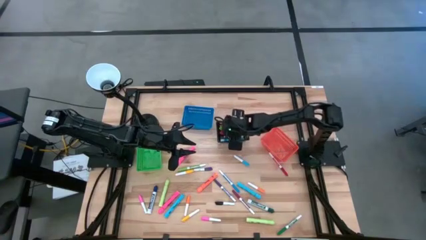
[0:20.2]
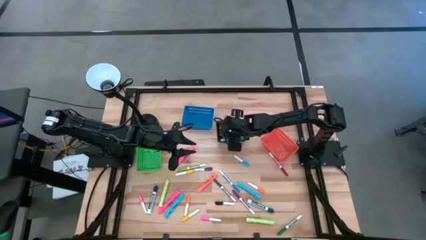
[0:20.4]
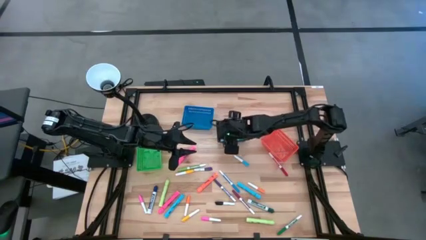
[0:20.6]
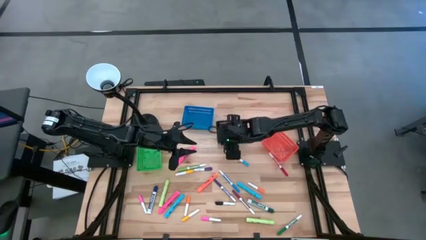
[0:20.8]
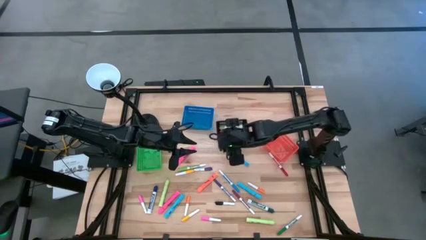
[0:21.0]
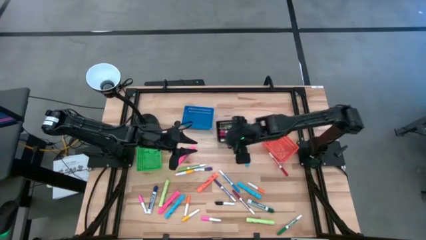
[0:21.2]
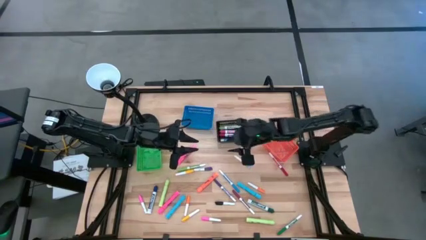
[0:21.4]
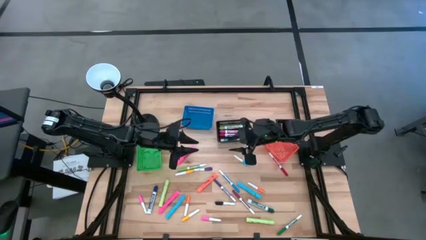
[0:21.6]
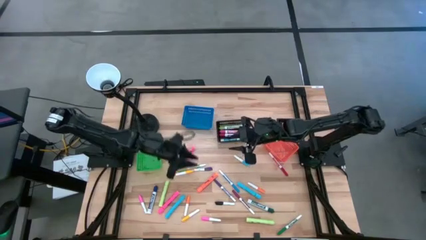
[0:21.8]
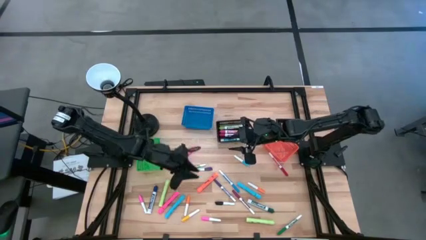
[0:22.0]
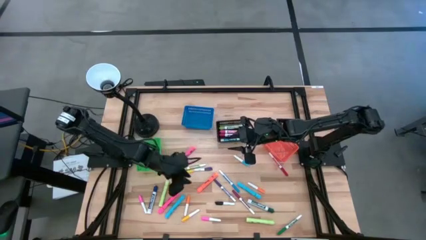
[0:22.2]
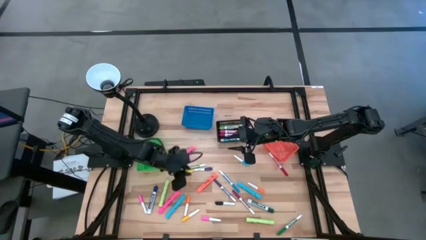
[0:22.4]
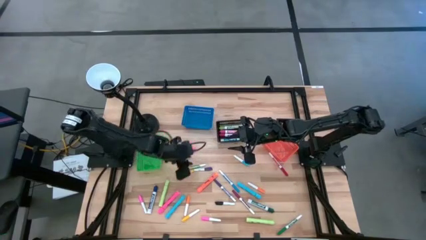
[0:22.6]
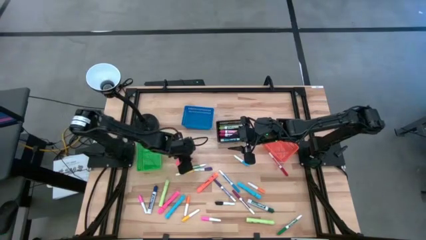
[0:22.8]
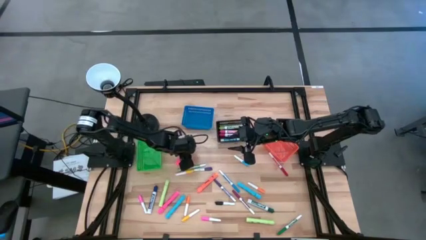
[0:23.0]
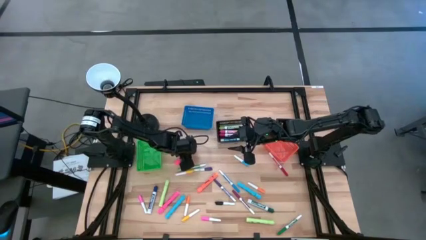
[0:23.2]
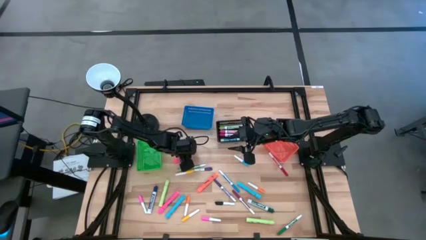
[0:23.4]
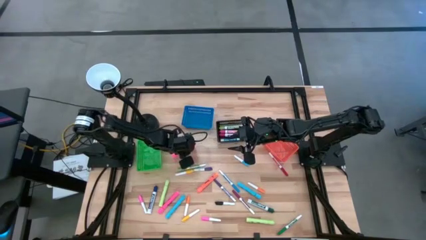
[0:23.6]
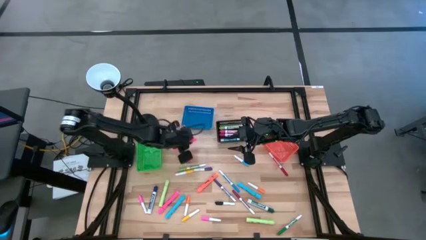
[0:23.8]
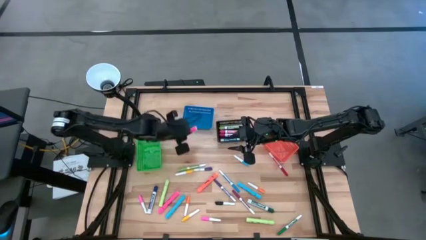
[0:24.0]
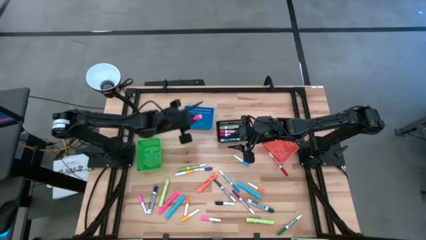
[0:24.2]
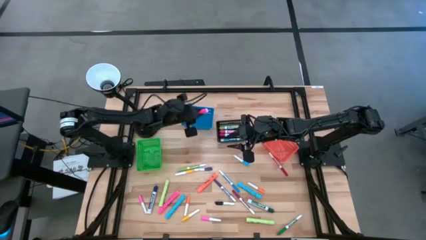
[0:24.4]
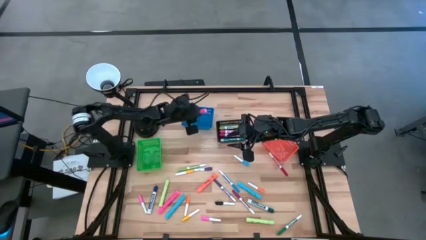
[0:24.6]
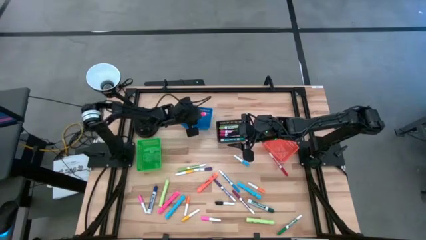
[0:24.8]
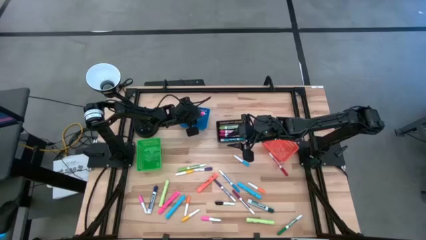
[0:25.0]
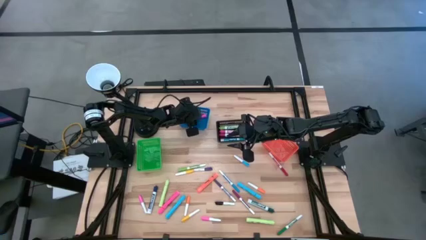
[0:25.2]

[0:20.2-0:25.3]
Task: Pick & Place Markers
Put the top pink highlighter pen into the blue basket

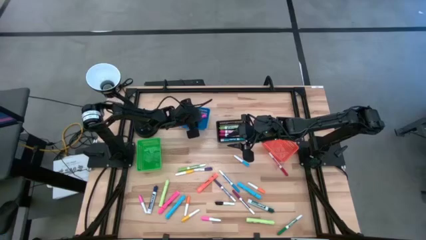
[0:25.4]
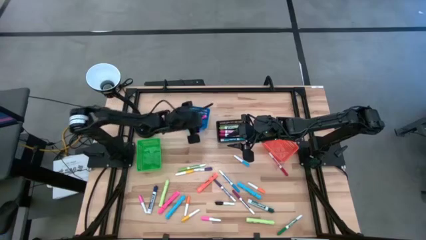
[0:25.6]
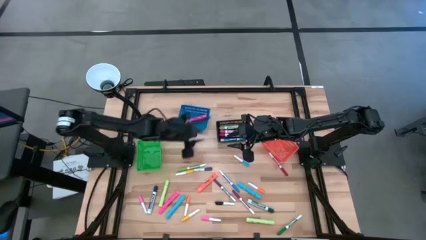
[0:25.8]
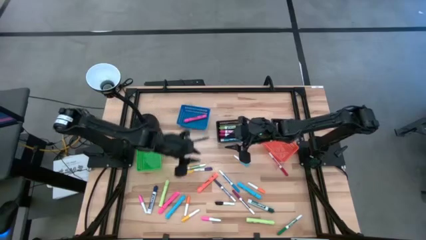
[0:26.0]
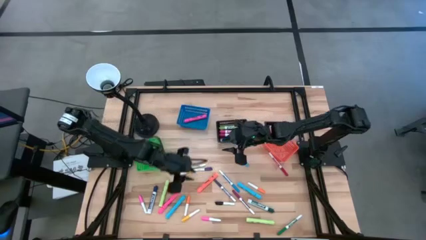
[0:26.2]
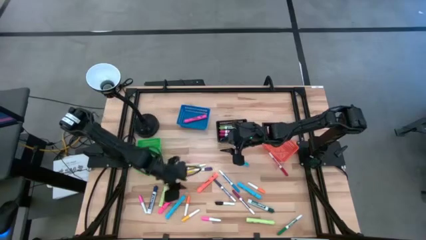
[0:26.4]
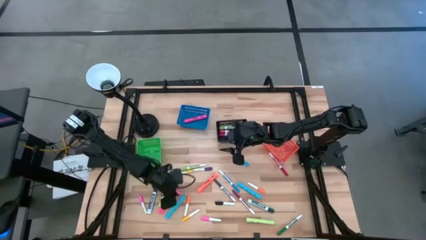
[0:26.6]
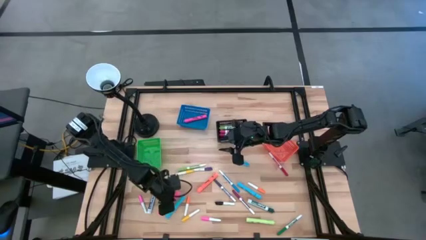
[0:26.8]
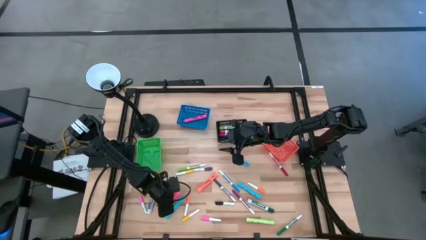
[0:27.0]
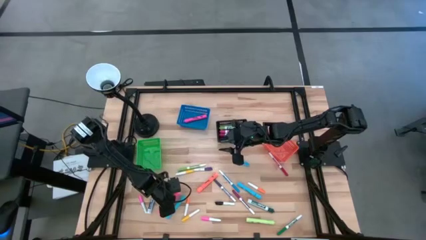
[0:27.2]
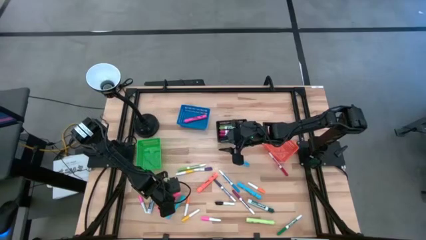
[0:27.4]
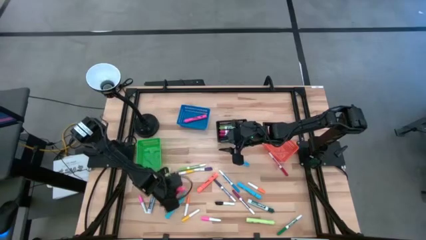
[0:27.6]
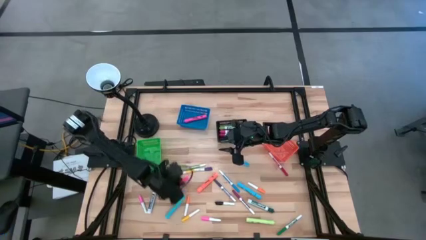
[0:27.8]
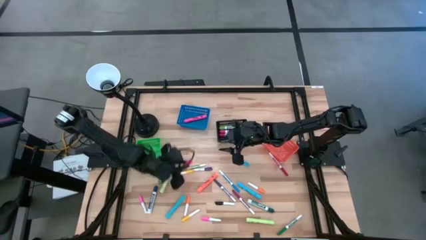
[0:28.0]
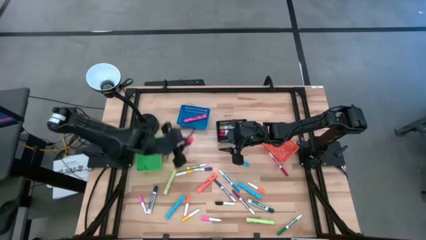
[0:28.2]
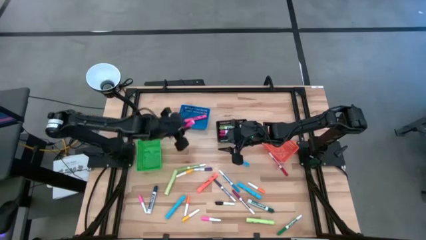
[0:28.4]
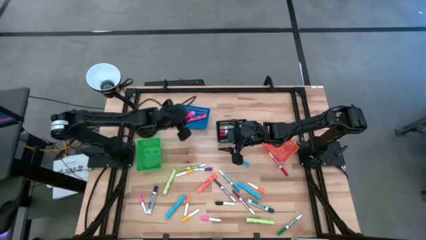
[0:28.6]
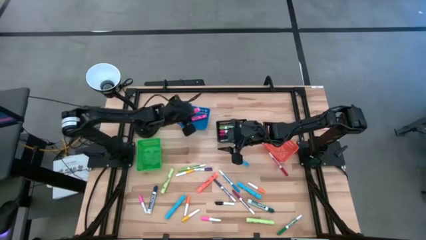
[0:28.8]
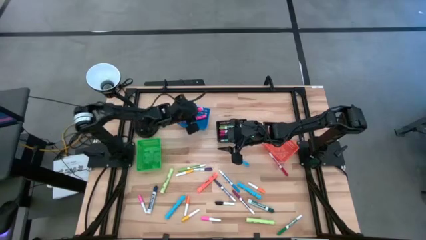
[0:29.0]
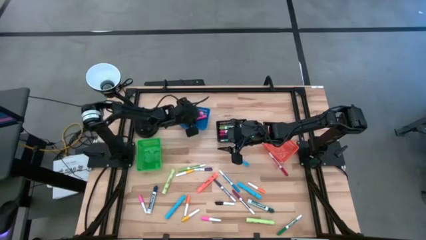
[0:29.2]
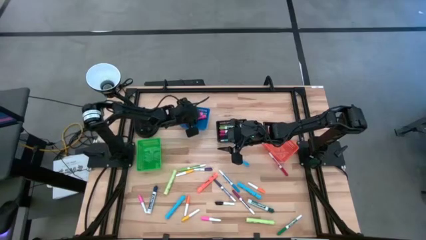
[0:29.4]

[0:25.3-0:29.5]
Put pink highlighter pen into the blue basket

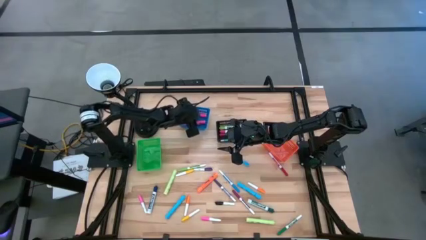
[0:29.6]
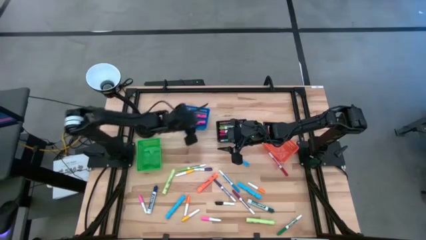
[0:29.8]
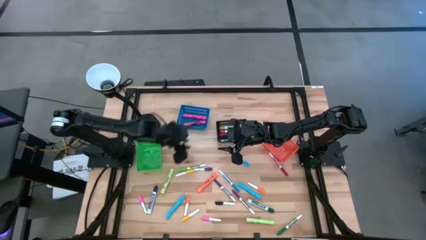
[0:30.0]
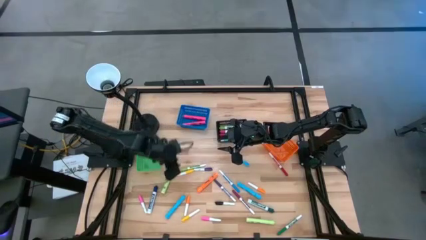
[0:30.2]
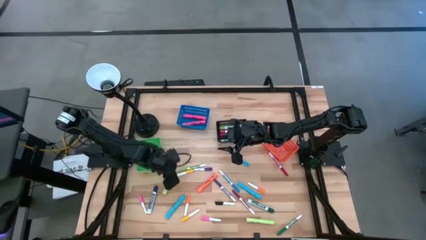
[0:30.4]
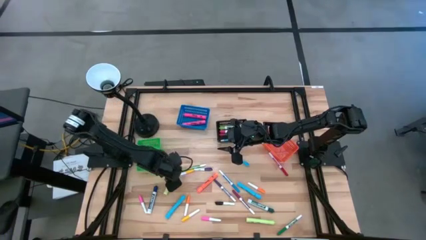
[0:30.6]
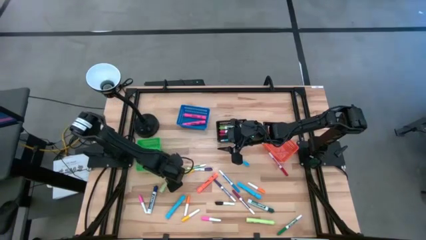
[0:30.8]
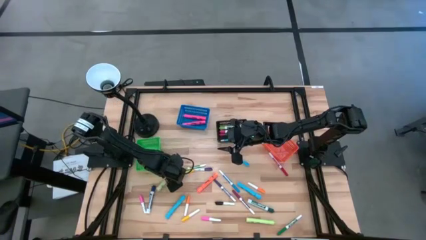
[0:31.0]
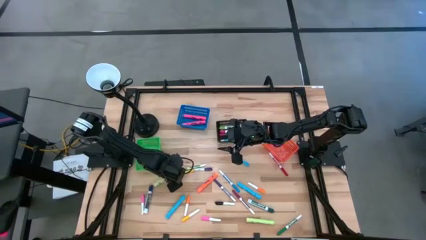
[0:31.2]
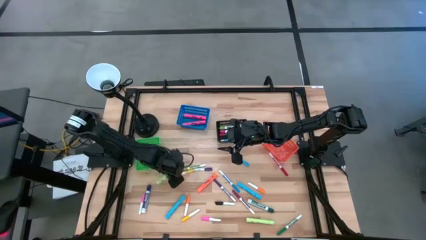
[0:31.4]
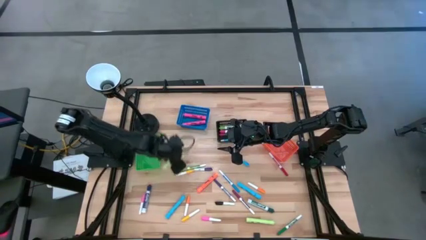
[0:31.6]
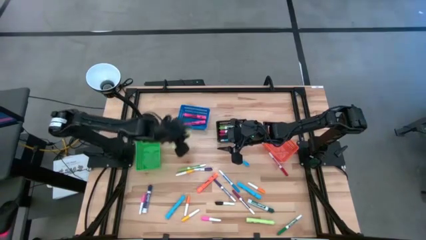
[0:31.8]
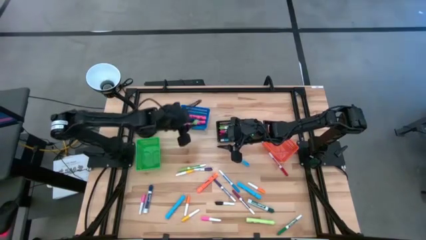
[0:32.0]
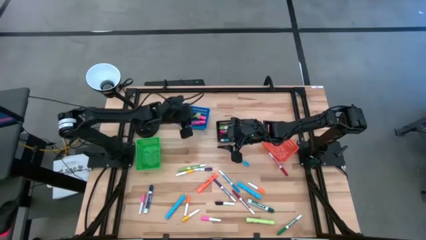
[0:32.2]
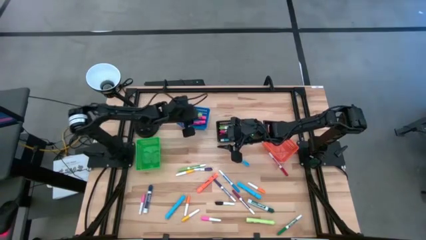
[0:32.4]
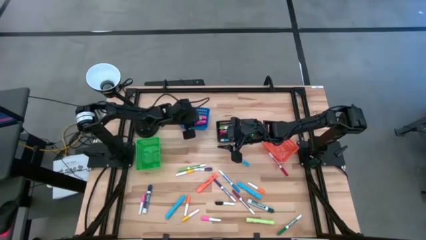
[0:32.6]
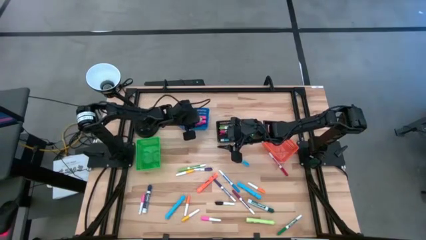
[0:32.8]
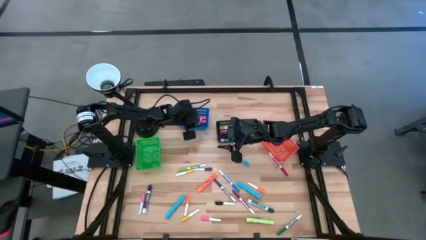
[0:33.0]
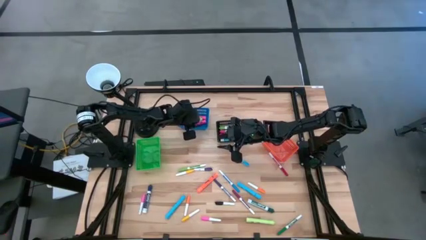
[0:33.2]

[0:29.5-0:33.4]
Put the left light green highlighter pen into the blue basket

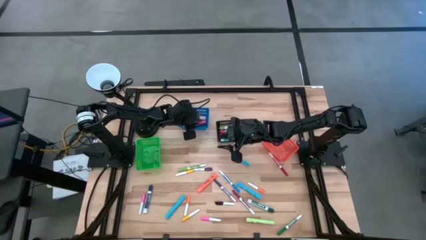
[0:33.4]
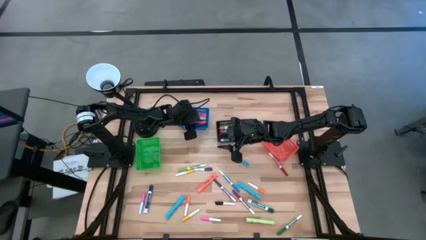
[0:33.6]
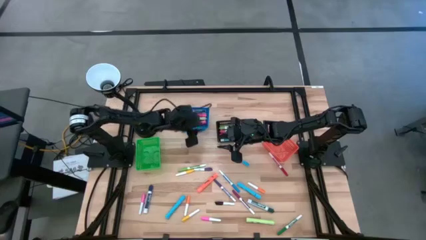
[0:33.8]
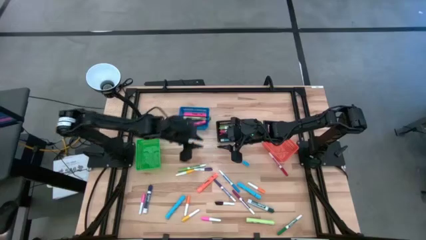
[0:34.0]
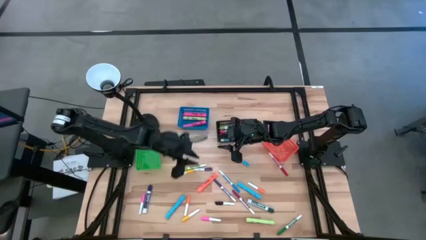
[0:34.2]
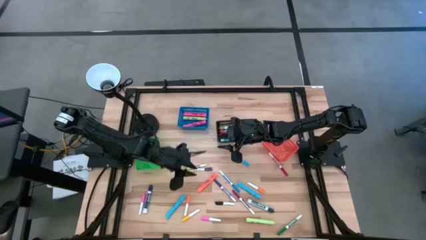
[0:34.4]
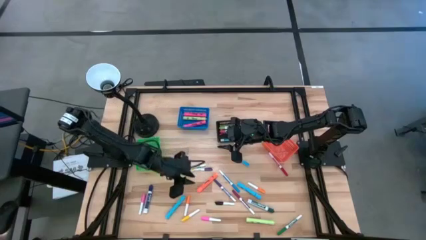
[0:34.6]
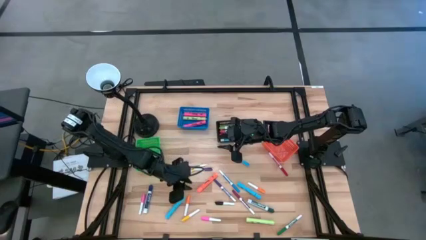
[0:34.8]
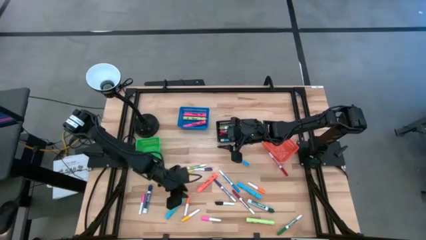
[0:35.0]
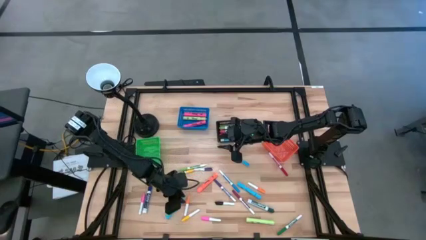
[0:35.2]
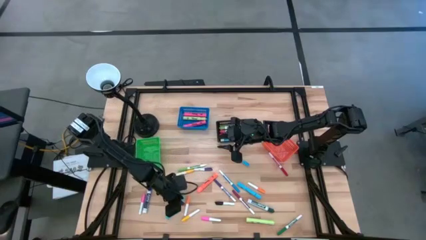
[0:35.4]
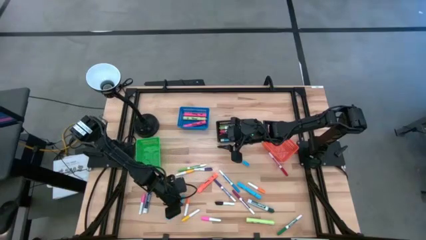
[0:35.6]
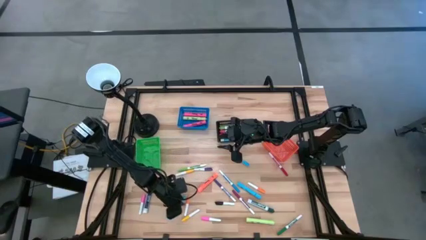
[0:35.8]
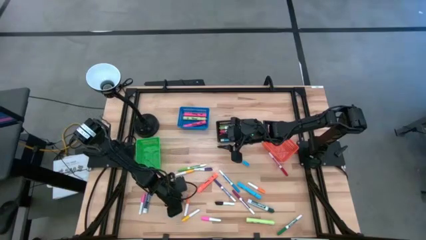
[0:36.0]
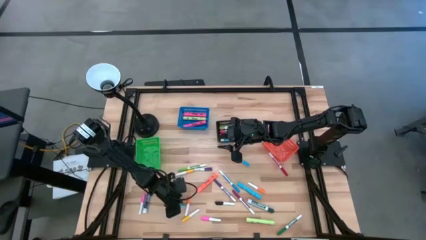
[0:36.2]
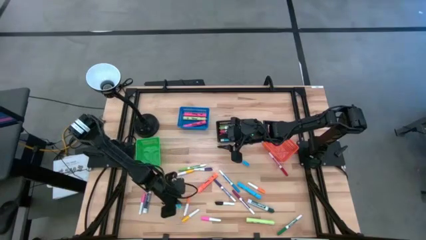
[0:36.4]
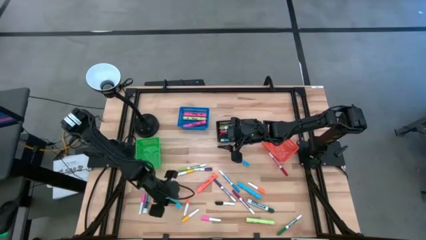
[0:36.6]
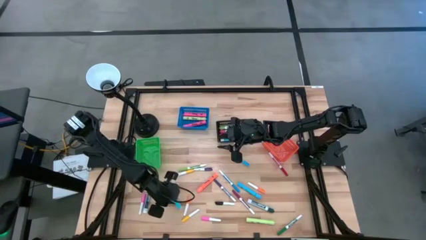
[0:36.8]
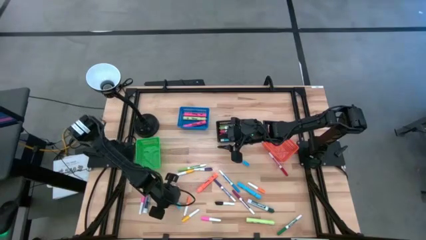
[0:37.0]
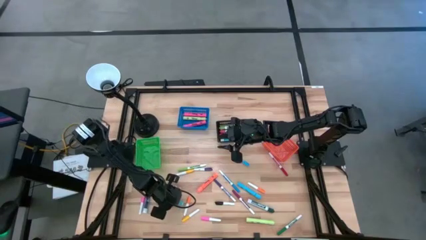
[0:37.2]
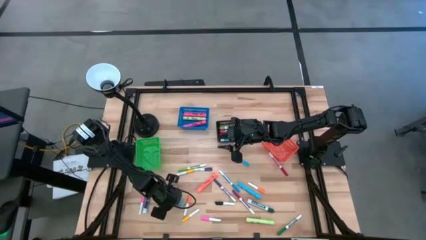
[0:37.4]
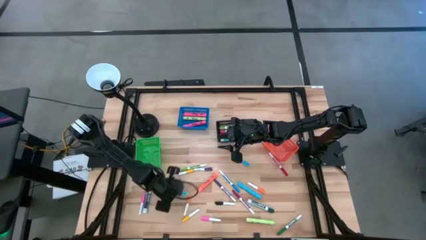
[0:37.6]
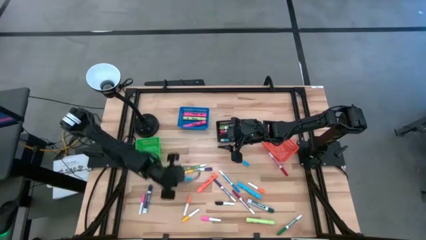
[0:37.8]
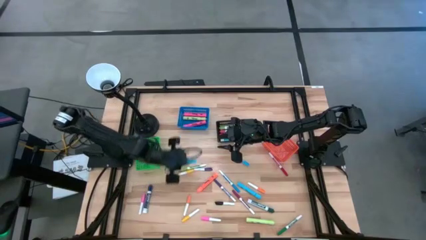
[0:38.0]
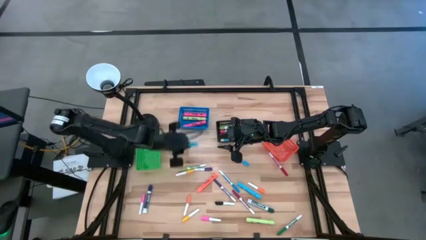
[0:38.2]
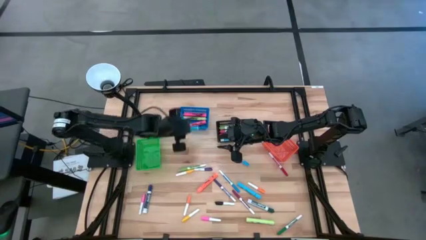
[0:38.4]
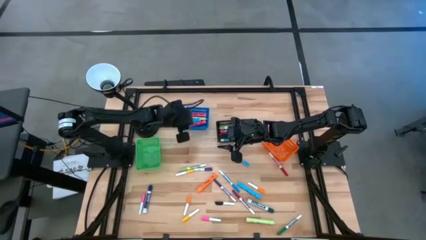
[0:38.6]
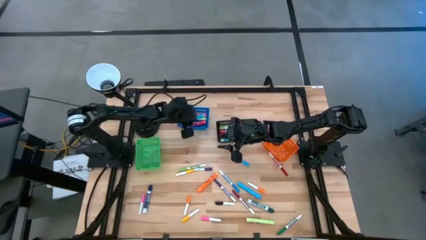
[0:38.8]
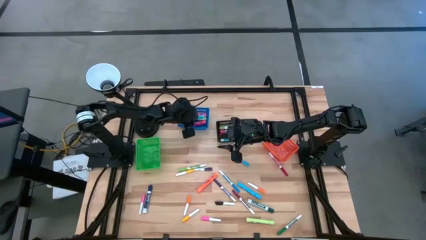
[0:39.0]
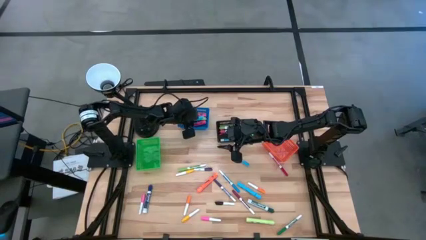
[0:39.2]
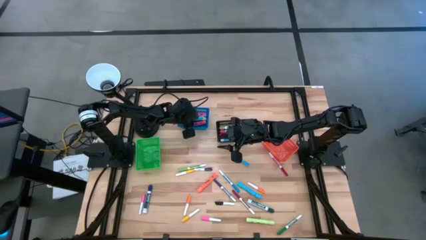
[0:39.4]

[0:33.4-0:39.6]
Put the left light blue highlighter pen into the blue basket
